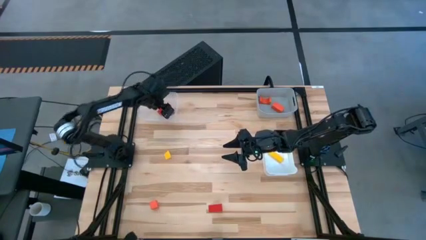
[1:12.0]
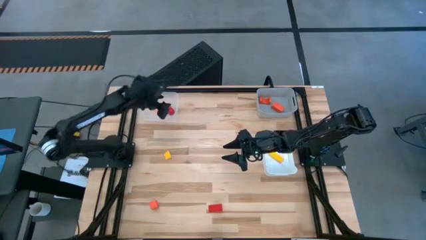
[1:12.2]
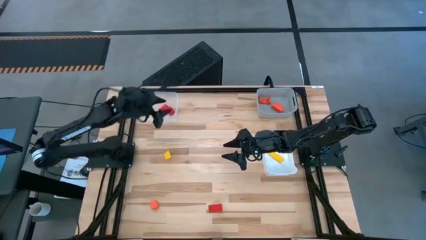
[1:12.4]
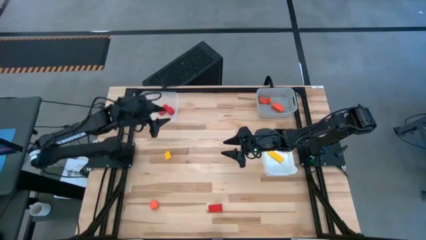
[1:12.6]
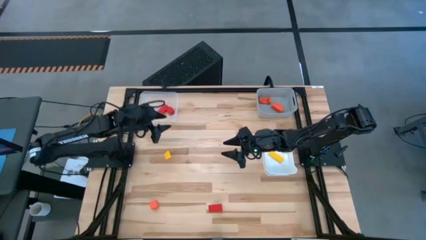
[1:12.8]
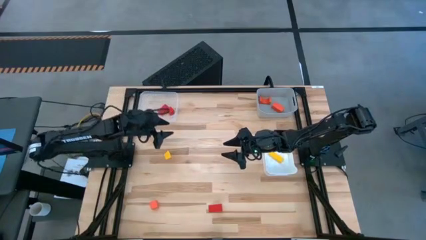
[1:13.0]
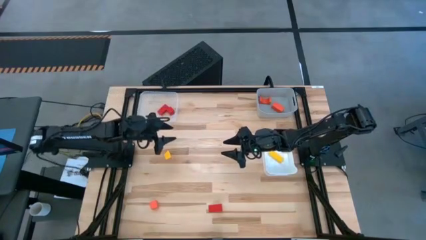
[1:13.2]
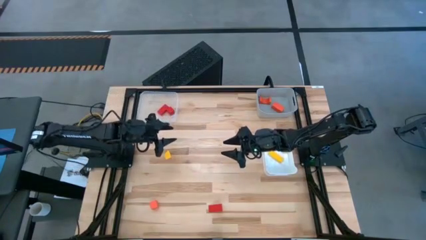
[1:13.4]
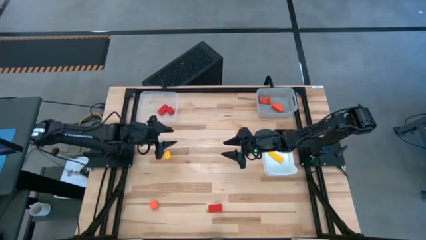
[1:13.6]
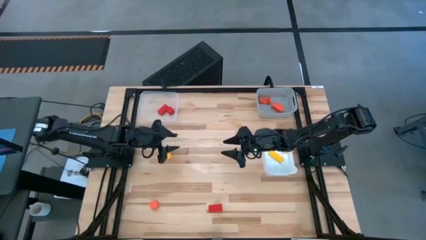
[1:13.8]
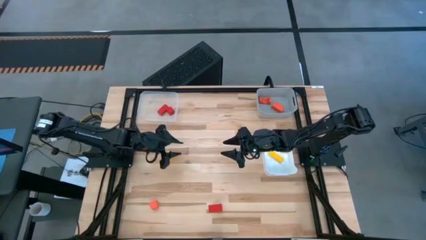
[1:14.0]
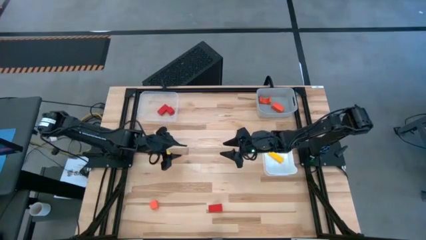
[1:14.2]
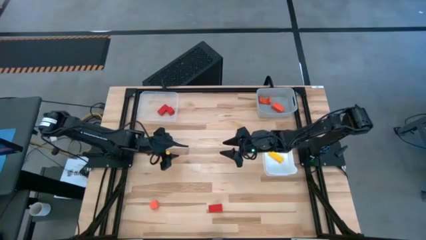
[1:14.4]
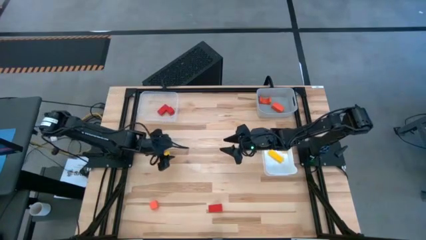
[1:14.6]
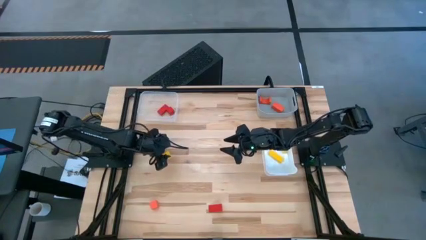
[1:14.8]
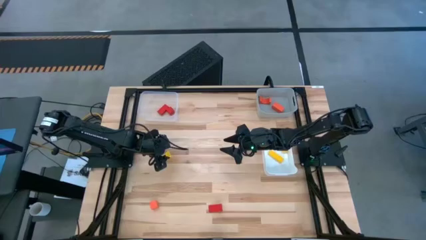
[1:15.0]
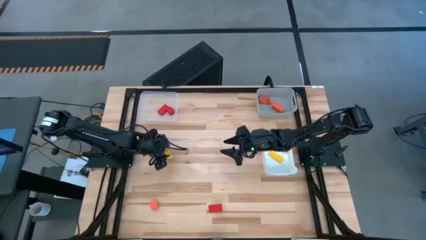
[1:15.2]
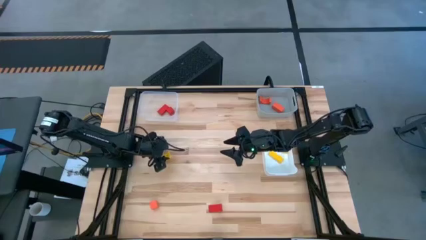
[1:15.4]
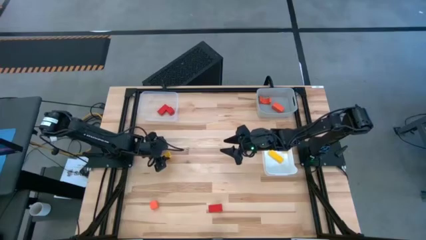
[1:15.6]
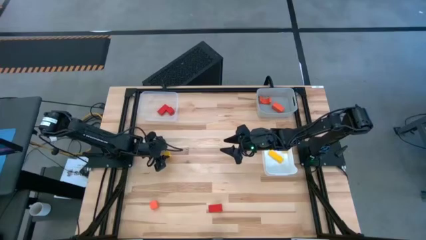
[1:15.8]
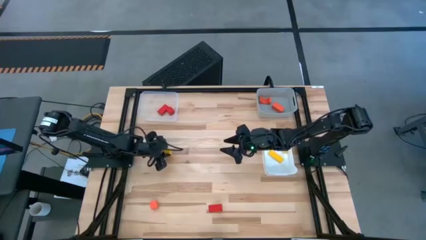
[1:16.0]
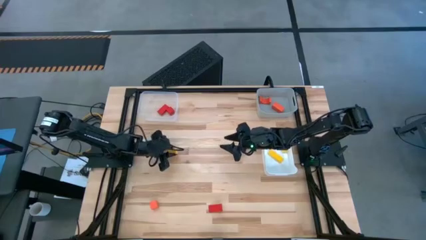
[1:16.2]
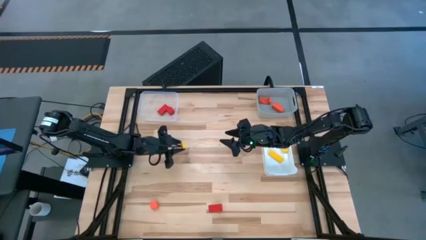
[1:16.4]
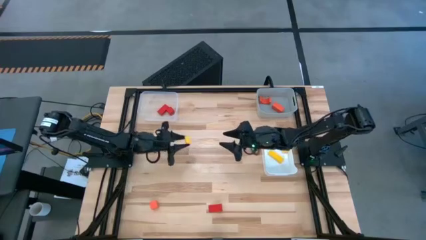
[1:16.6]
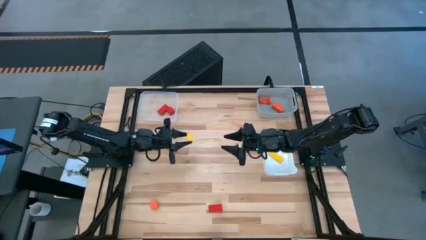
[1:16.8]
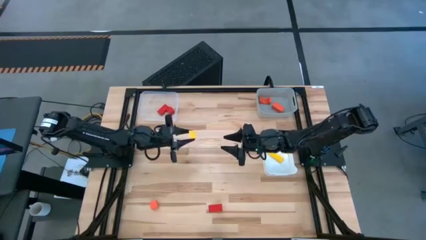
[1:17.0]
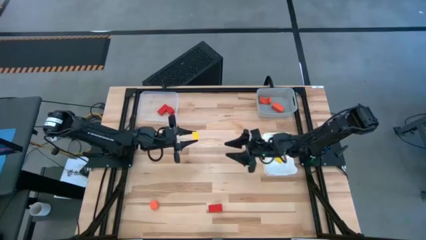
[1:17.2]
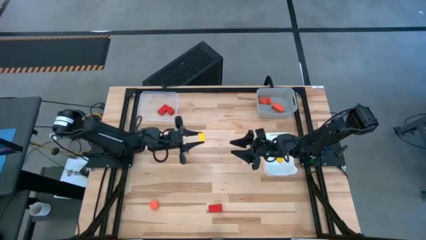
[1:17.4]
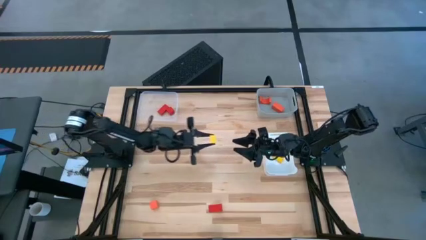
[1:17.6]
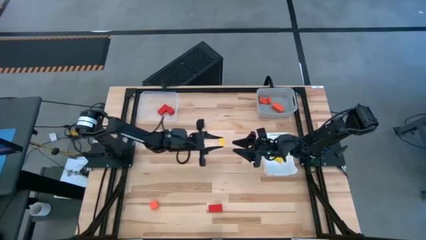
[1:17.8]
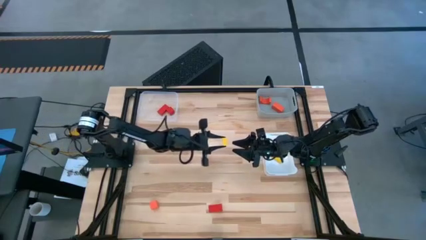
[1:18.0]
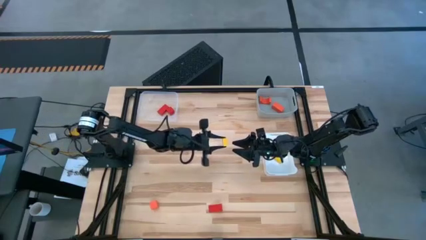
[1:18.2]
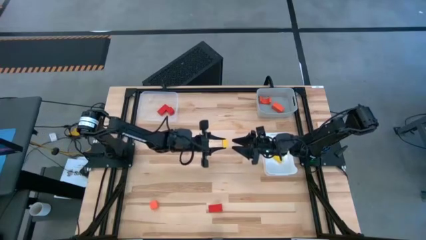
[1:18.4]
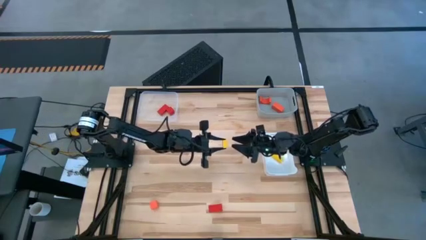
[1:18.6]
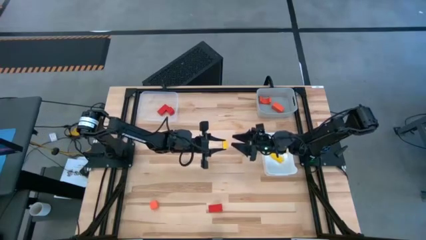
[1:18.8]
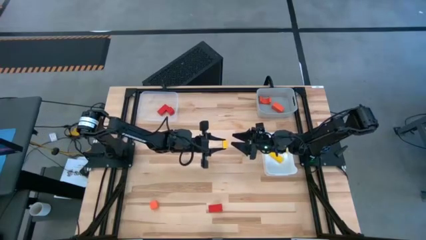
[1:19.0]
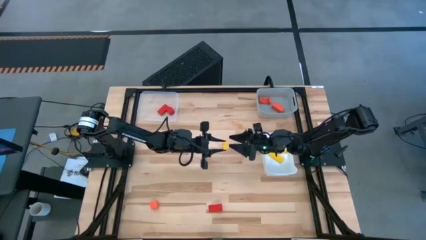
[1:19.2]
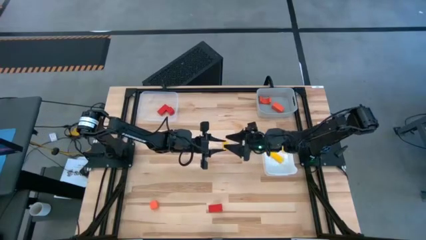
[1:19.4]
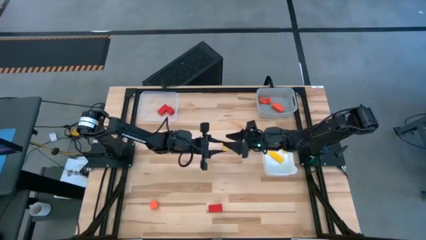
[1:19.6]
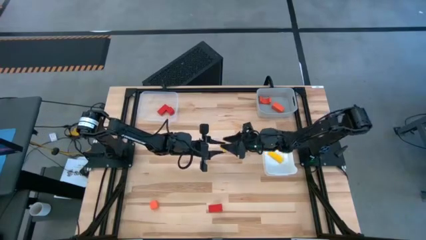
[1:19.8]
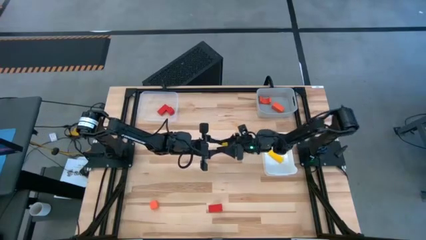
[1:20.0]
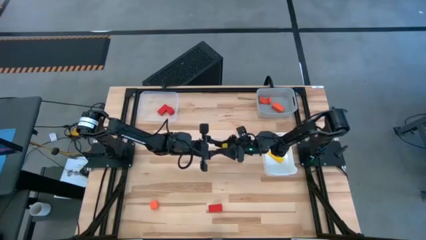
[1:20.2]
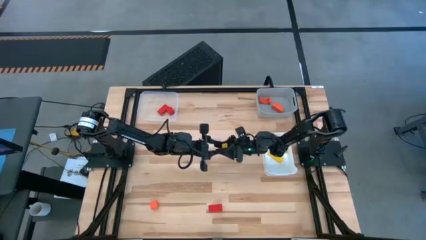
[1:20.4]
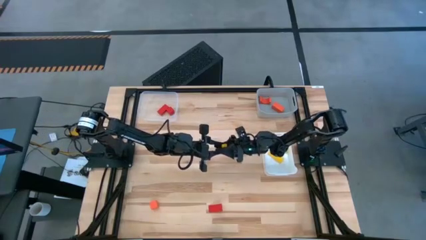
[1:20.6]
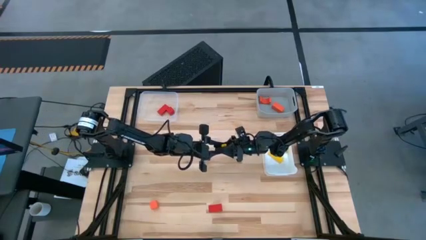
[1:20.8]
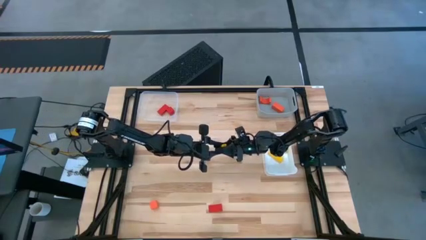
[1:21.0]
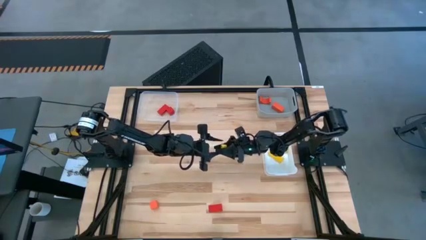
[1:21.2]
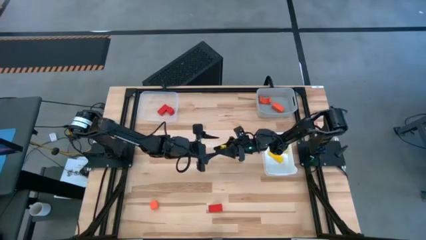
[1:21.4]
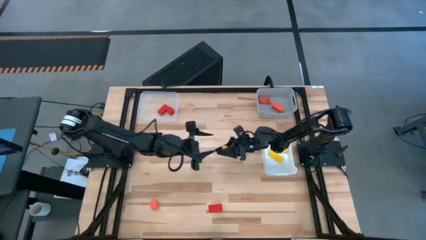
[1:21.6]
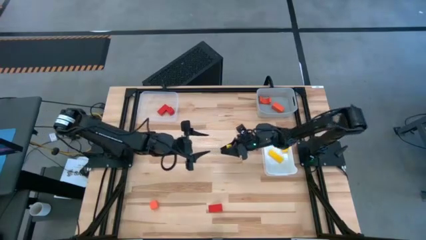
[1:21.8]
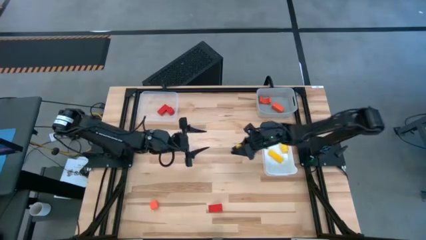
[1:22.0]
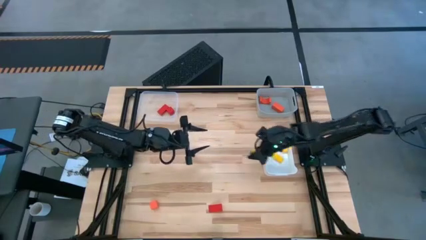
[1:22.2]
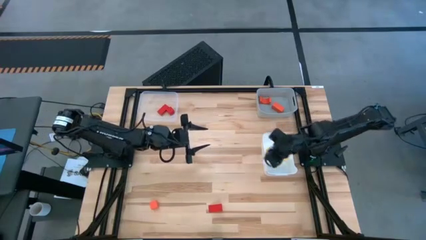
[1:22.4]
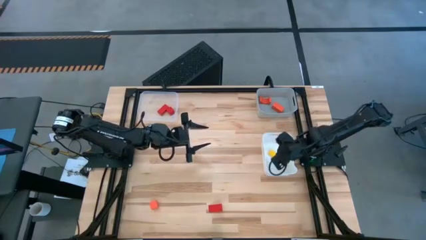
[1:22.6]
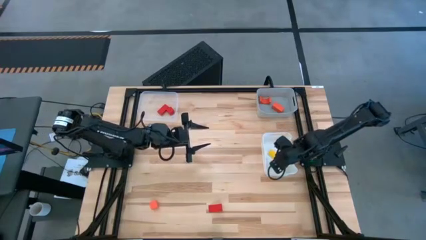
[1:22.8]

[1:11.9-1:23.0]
Task: Sort & place blocks by color
Put the yellow block into the white bin

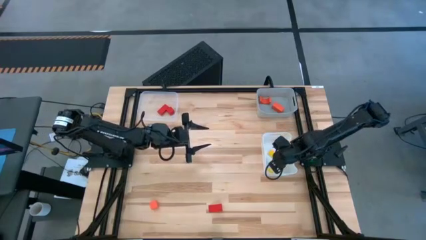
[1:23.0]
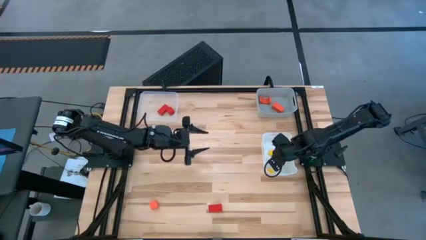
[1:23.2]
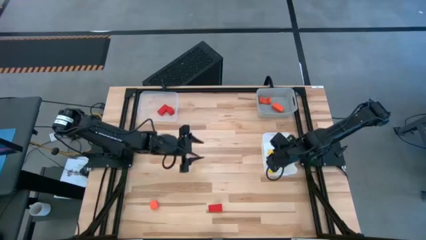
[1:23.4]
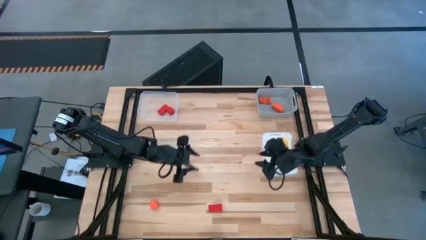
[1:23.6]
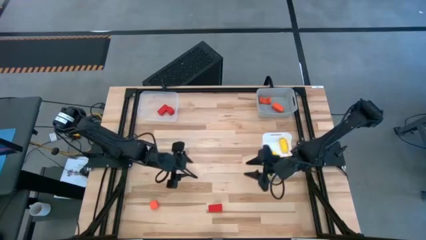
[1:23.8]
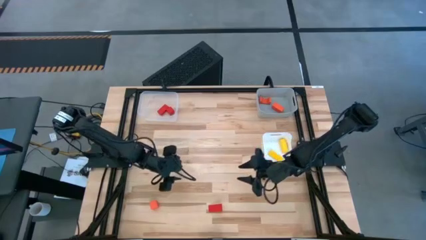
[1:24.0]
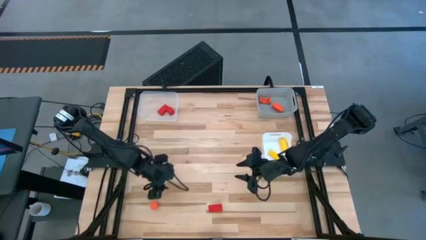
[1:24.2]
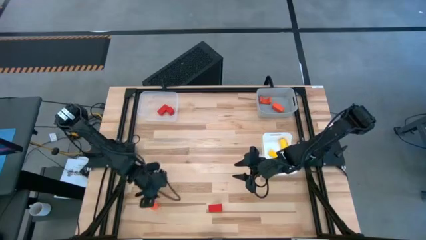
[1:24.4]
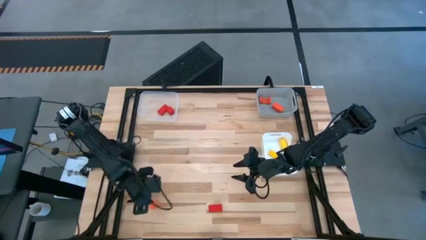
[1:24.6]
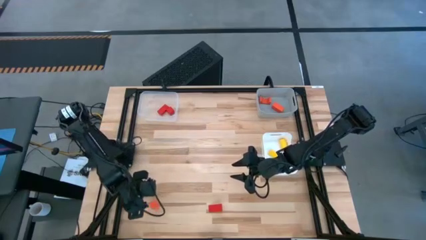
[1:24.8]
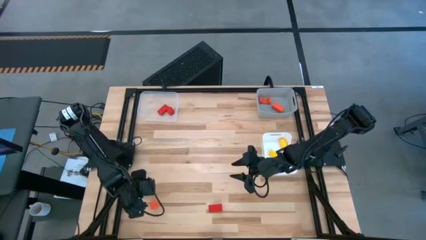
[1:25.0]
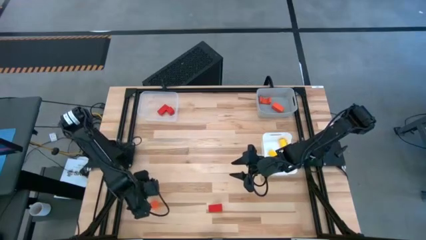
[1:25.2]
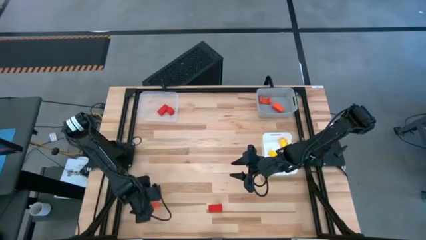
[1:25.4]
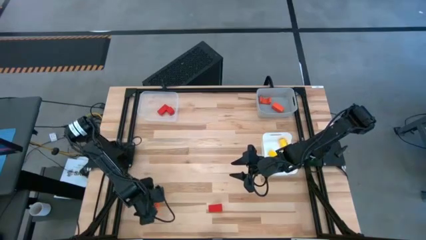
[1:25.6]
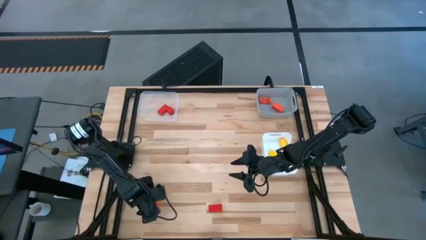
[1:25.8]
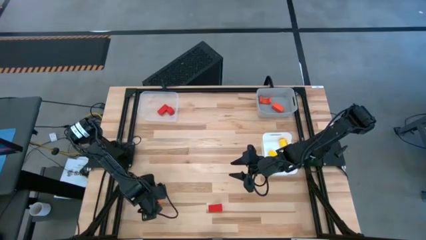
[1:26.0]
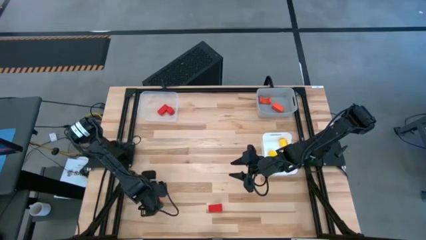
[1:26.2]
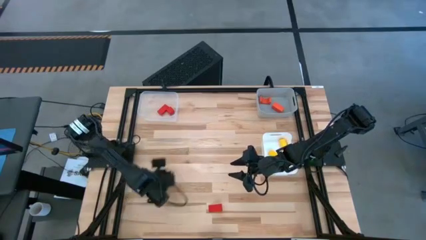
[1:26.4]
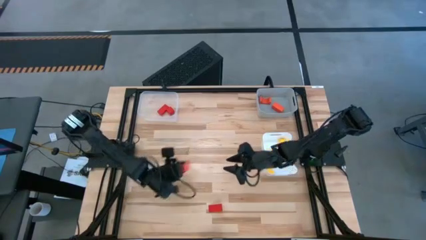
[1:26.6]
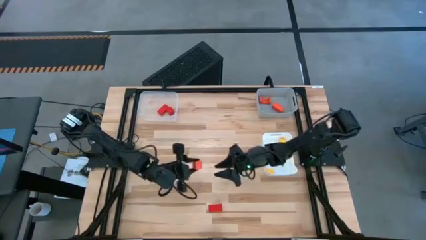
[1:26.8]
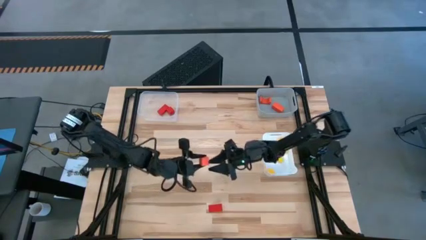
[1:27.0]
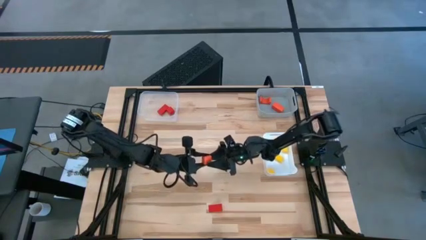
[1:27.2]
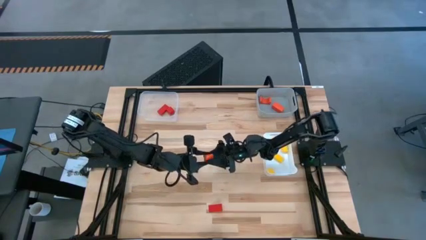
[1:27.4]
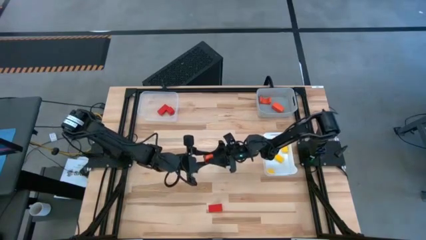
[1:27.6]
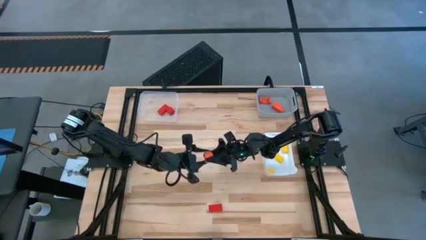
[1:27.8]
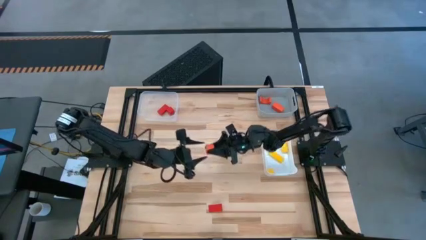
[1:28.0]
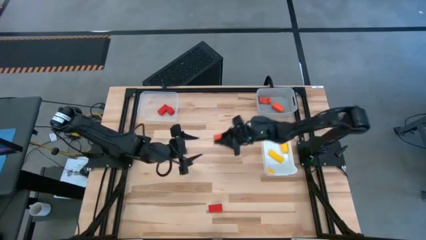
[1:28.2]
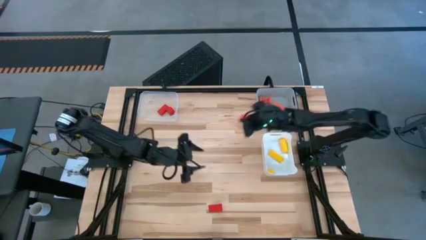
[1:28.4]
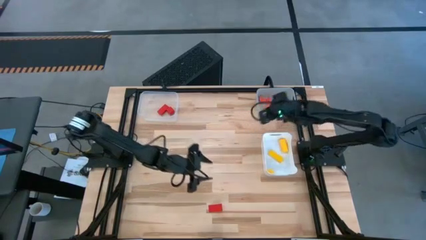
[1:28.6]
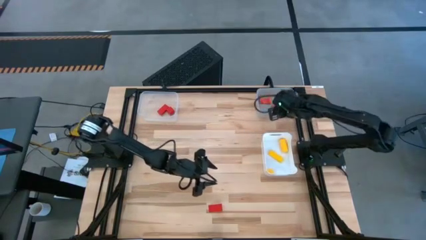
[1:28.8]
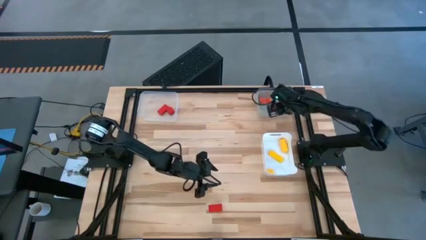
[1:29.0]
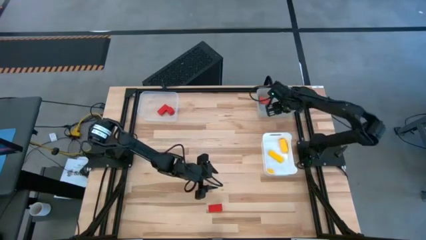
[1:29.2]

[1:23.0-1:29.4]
Put the orange block into the gray bin

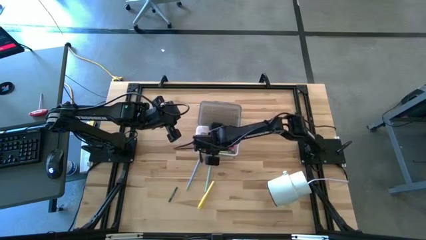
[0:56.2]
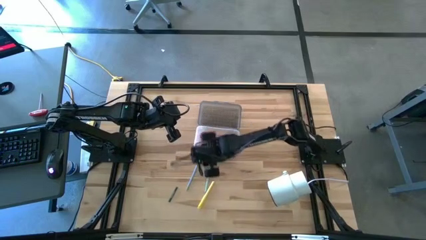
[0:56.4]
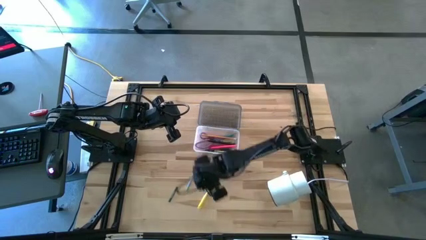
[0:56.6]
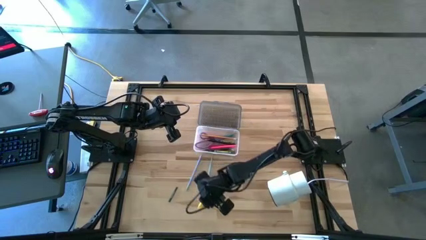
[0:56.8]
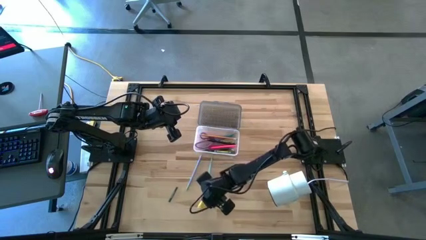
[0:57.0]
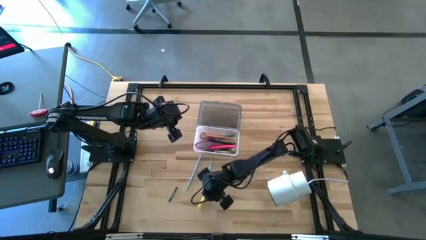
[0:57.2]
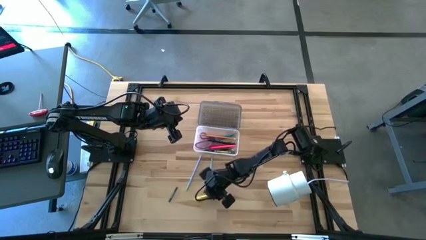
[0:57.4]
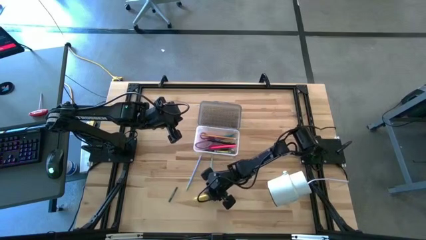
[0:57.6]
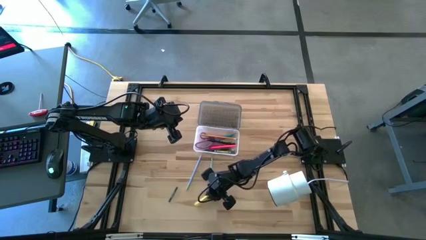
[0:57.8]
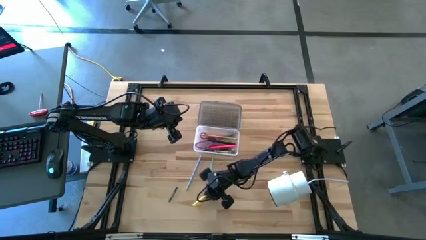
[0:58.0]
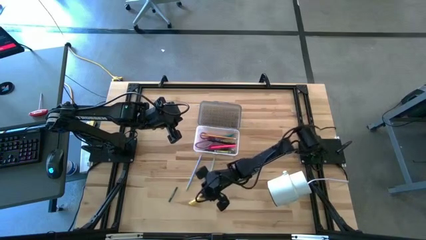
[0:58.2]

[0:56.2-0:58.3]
Task: Pick & place school supplies into a supply box
Put the yellow pen into the black supply box
